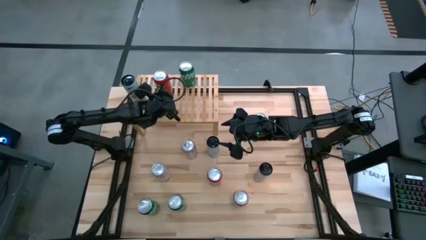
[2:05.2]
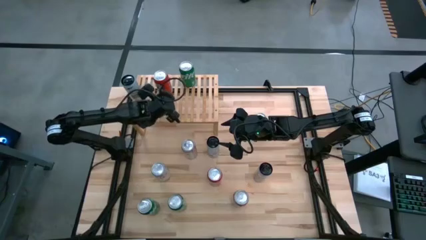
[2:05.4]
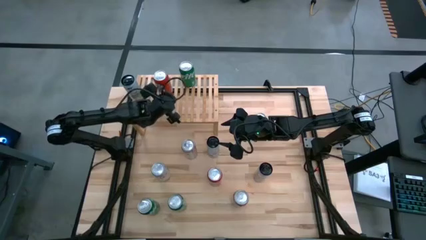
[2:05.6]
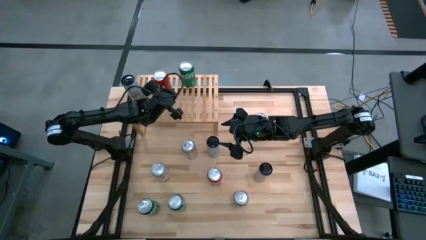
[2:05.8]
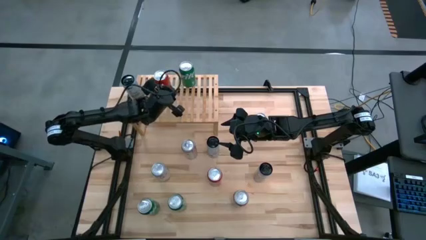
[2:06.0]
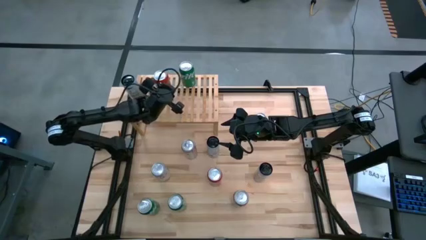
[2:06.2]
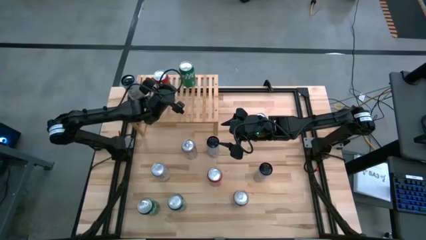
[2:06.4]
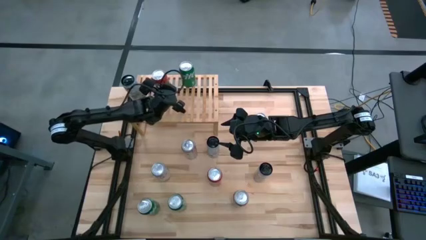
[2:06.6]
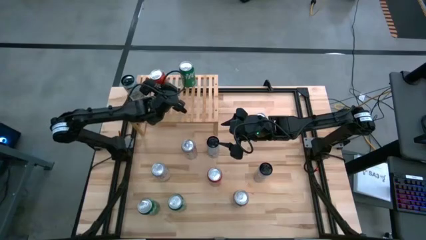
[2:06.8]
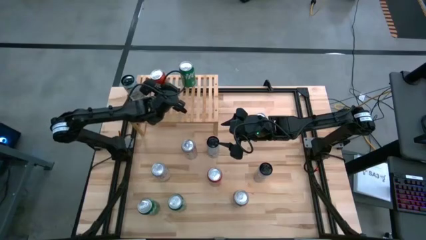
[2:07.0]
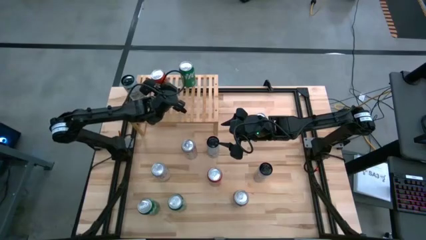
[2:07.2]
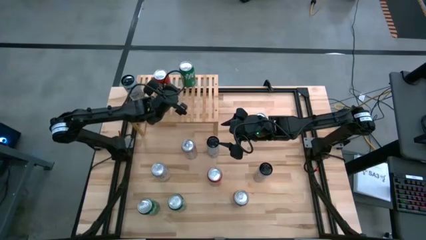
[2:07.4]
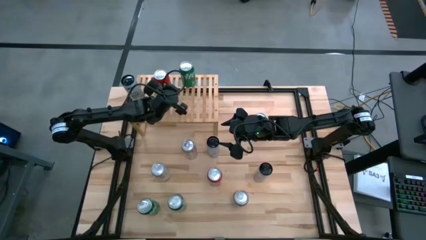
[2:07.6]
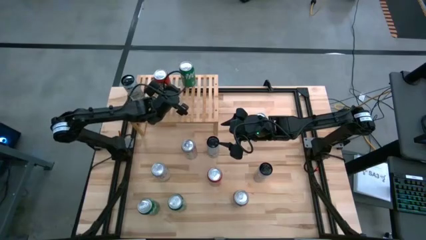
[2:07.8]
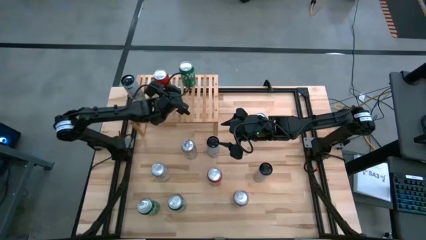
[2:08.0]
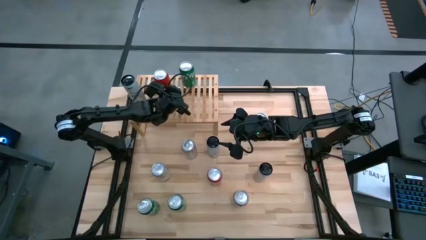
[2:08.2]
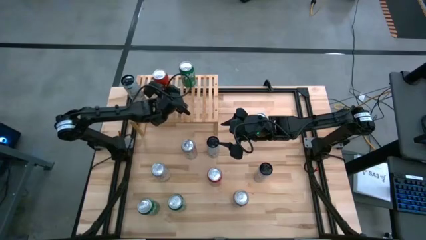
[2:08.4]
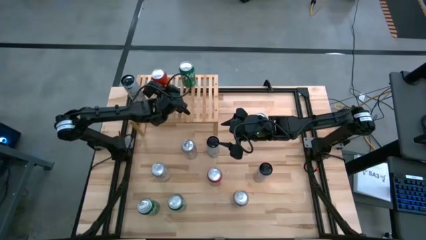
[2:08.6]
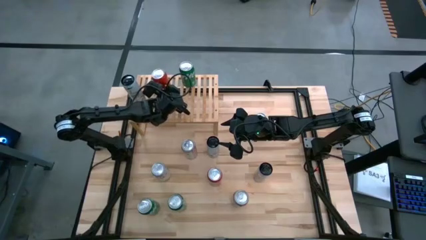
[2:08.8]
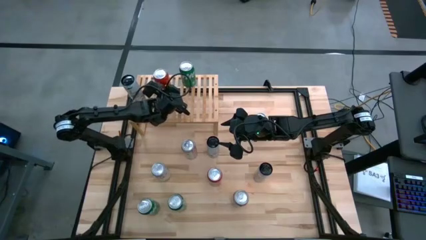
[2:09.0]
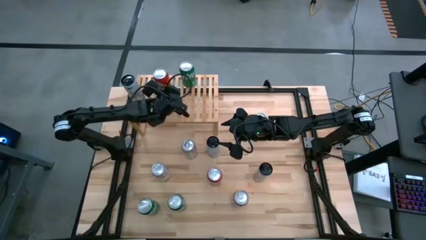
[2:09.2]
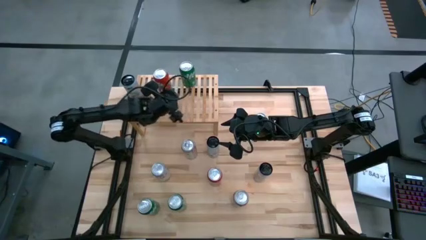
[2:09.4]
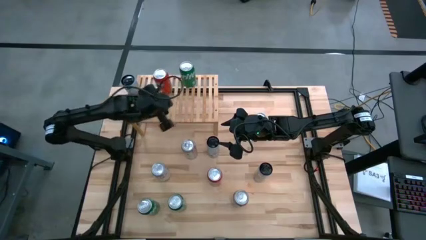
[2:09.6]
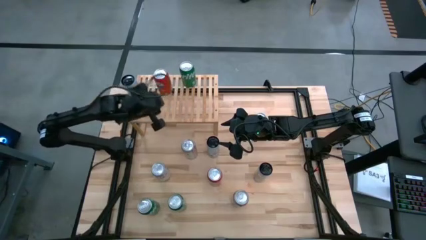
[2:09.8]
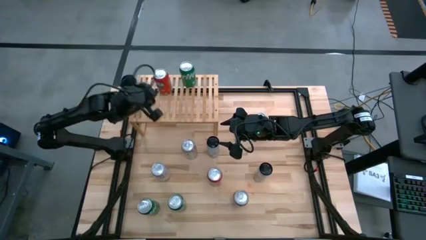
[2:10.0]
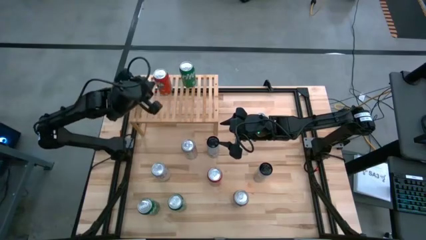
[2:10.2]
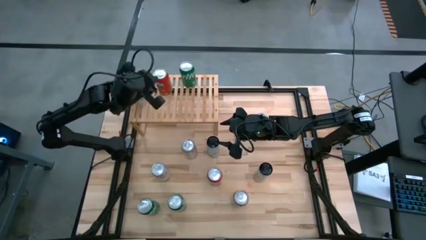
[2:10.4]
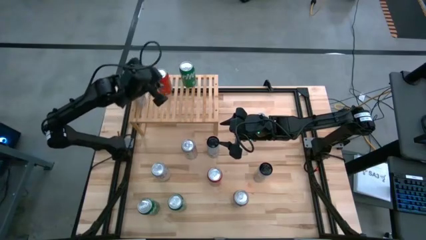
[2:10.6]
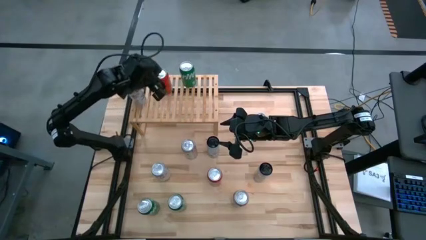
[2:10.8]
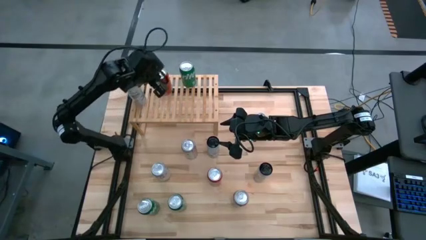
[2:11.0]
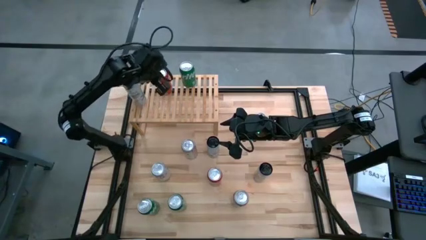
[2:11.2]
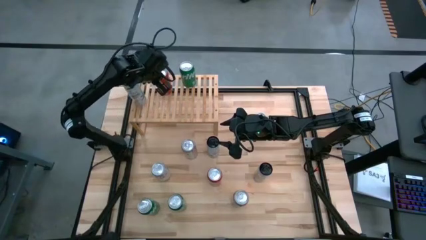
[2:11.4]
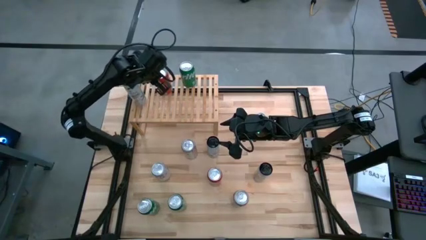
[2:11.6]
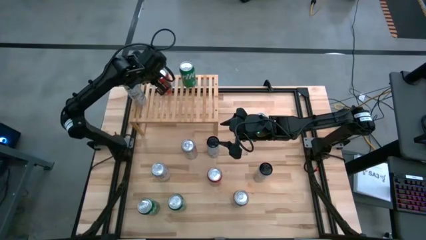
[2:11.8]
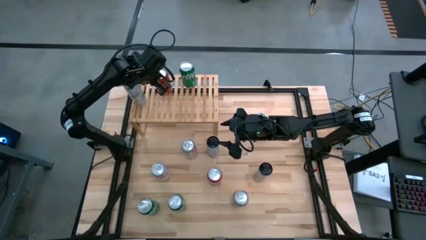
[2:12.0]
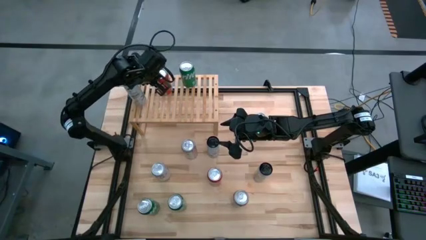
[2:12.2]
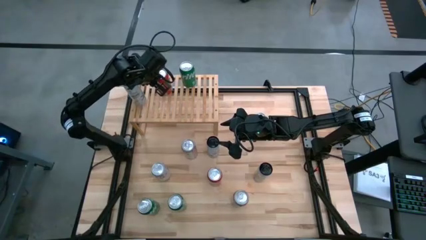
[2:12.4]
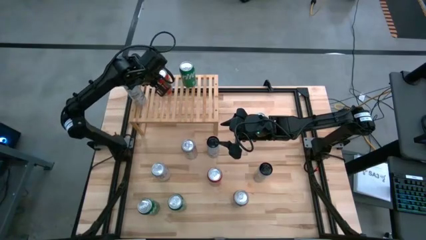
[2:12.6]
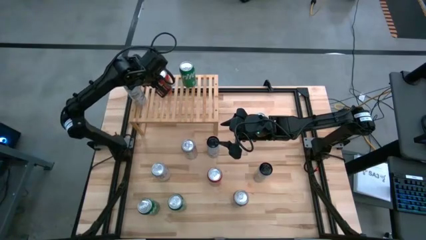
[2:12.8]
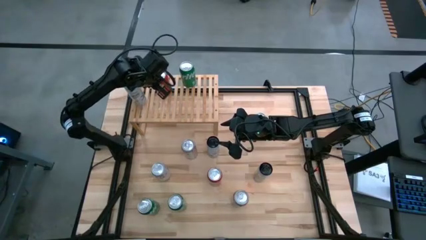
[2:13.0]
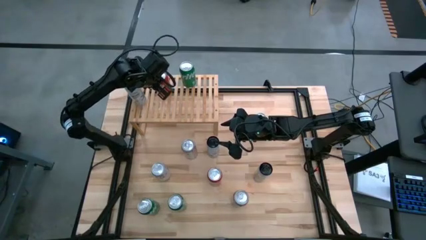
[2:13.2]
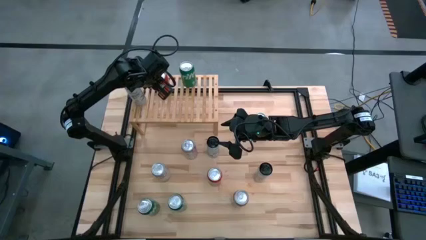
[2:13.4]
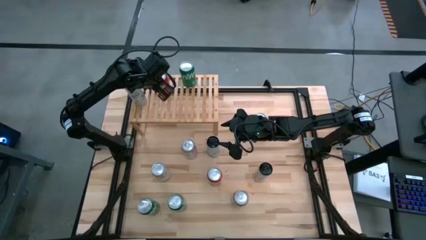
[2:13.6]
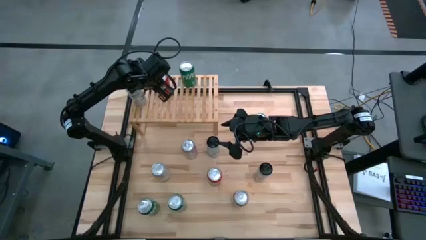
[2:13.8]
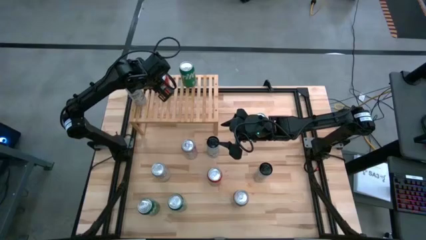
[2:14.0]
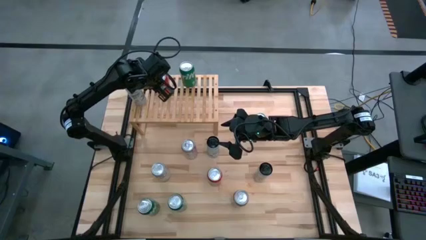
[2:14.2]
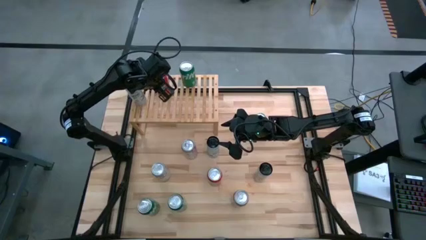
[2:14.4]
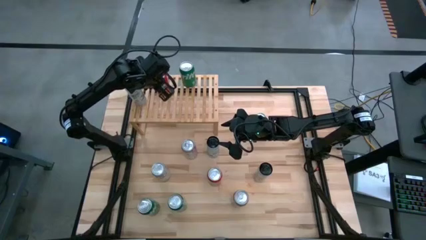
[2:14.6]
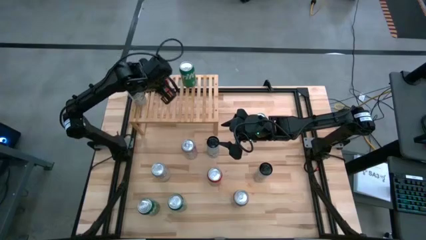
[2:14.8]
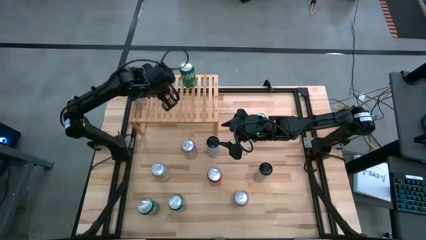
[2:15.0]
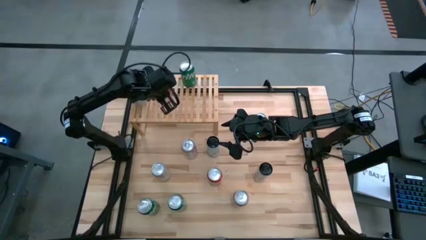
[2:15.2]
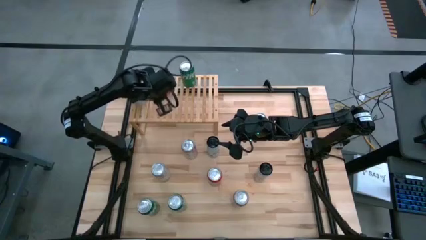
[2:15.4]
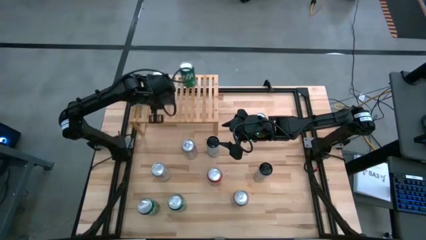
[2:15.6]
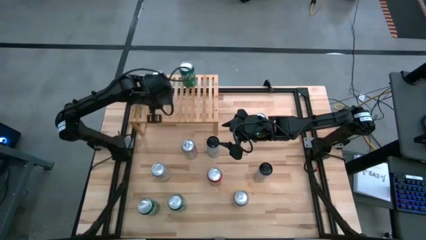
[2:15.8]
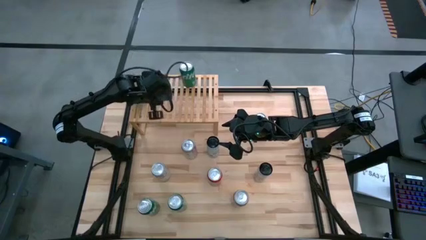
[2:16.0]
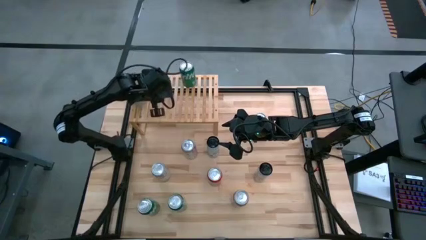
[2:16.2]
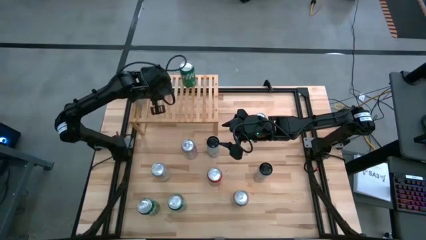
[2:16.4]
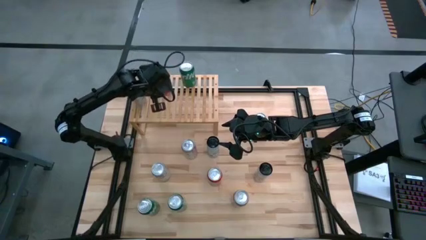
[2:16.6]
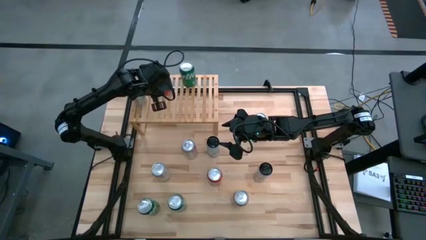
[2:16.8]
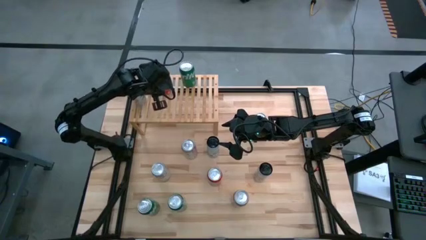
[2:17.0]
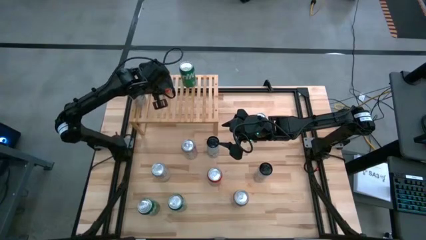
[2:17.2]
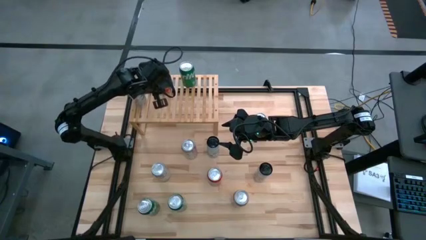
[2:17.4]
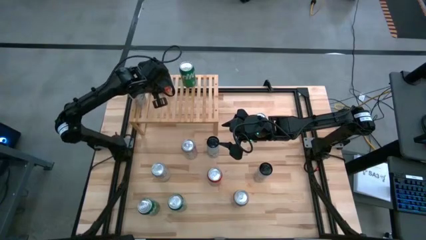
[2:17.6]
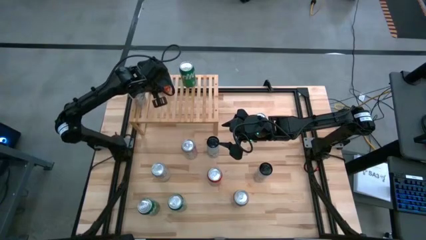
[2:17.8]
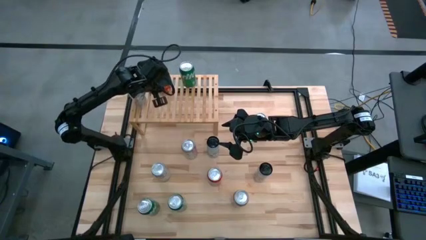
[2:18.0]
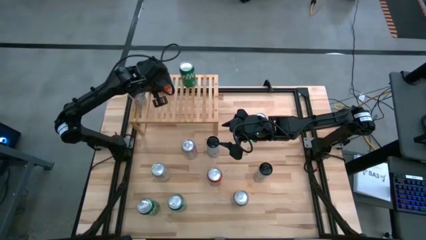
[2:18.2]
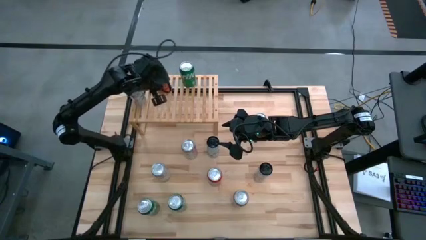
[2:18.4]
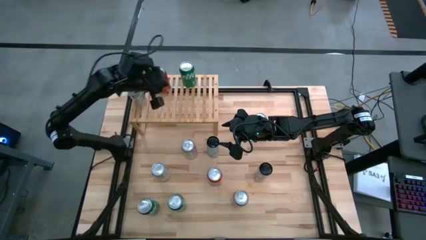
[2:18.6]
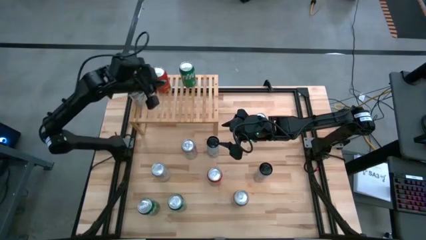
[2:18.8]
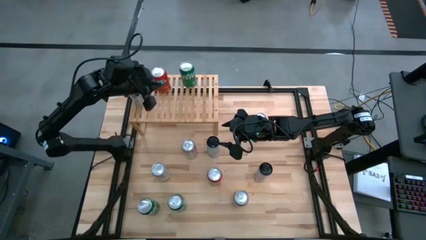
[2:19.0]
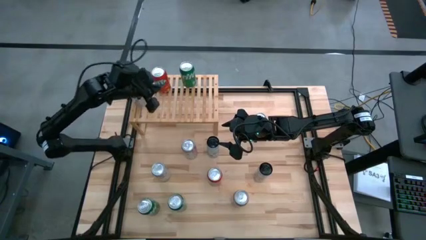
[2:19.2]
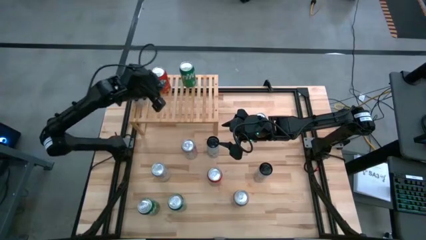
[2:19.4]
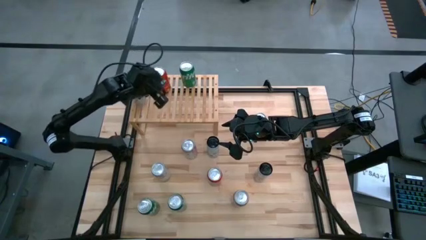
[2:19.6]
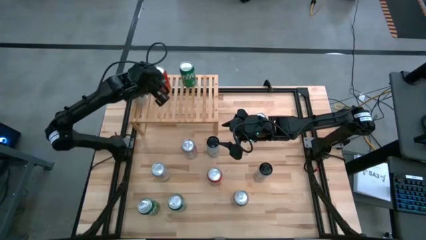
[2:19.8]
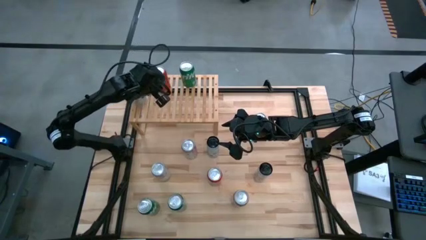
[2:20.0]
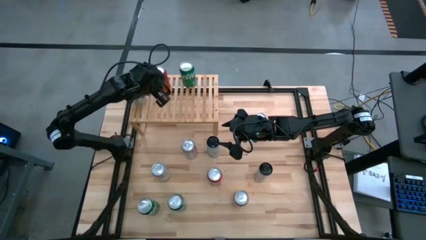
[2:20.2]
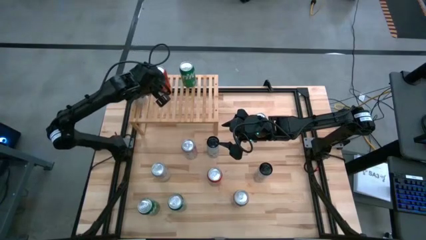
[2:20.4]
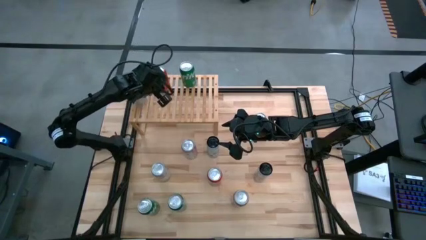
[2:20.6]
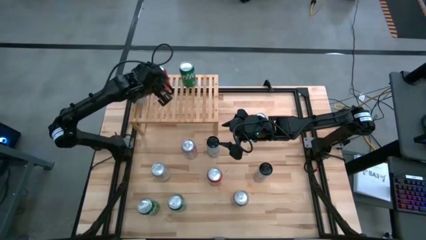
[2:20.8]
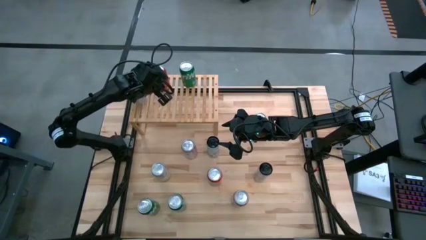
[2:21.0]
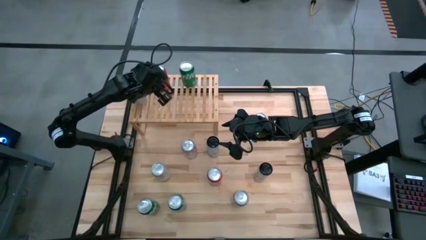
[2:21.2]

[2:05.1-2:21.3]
Task: Place canned beverage on shelf
Put the middle orange soda can on the shelf
